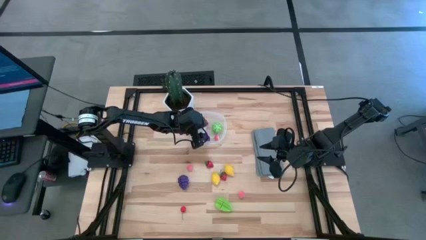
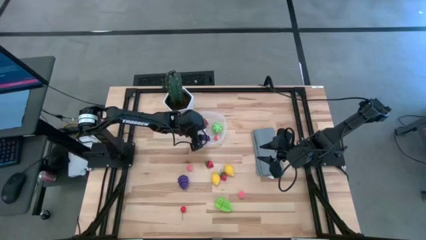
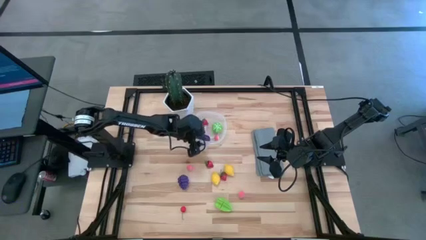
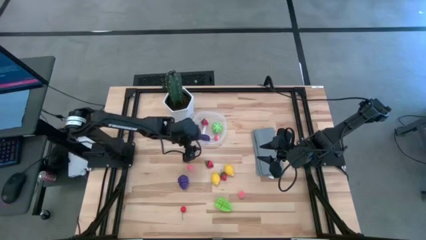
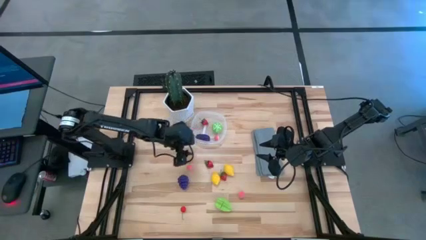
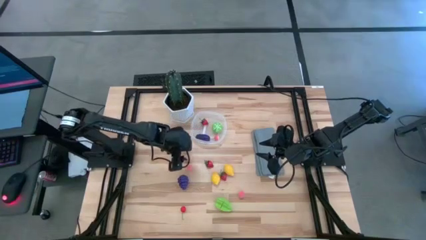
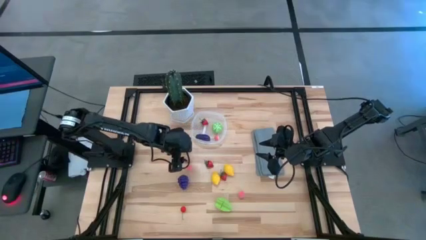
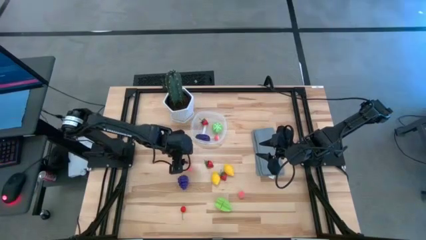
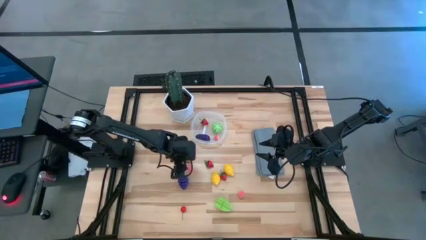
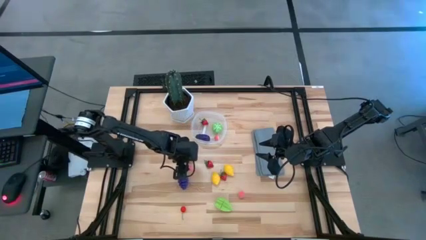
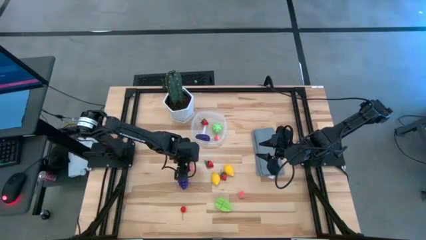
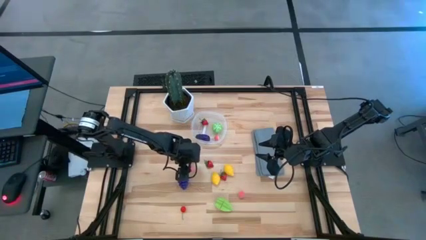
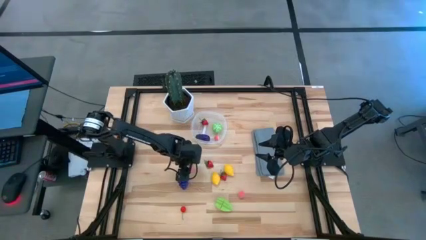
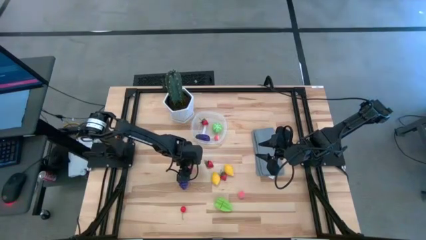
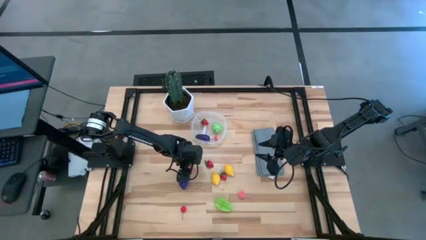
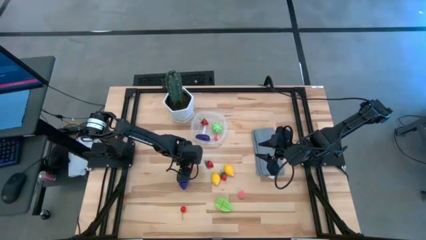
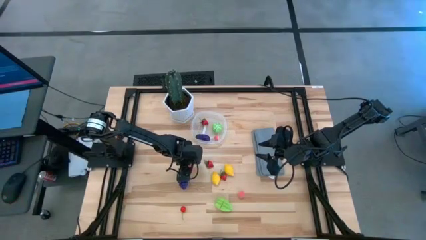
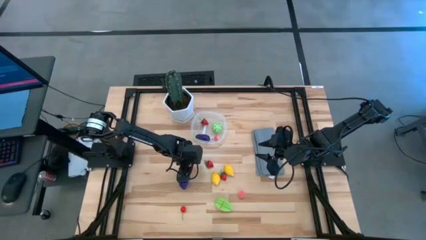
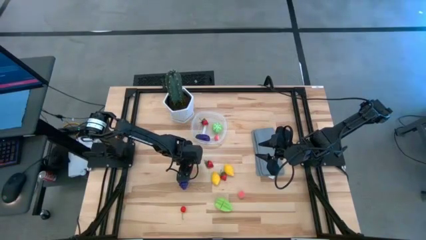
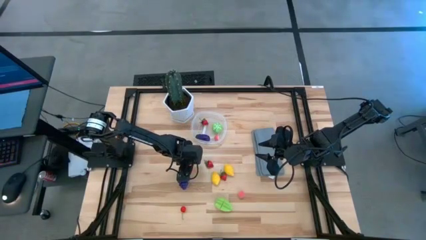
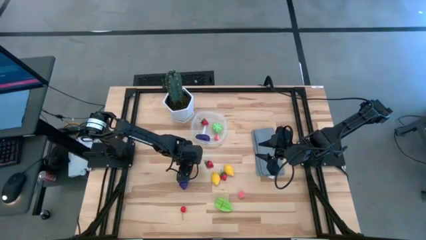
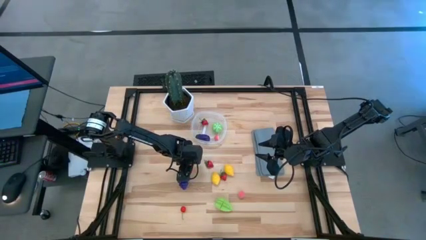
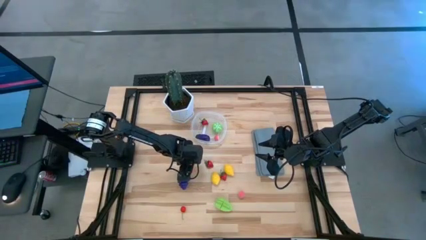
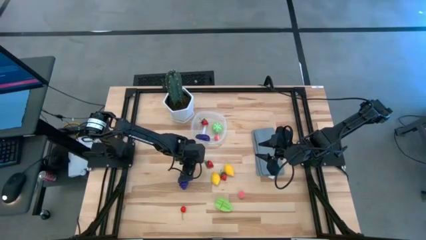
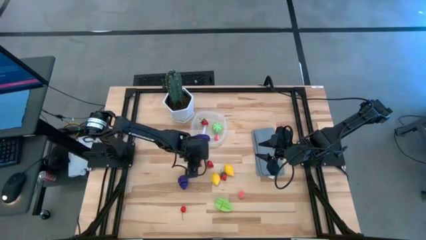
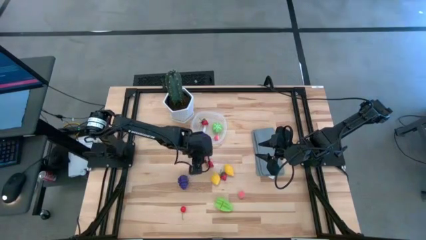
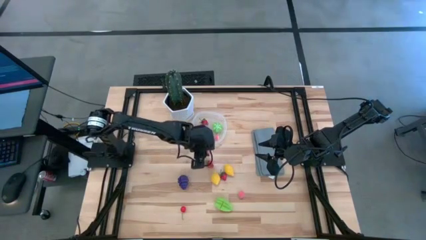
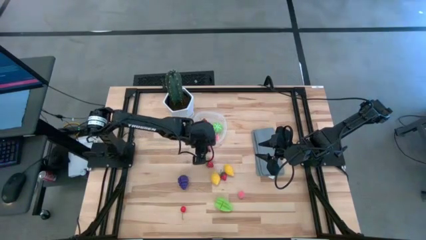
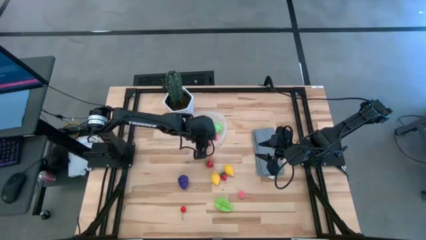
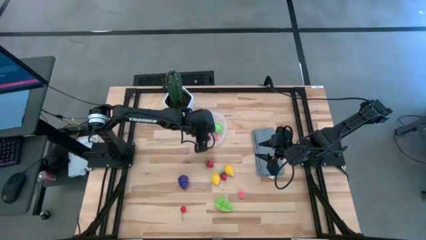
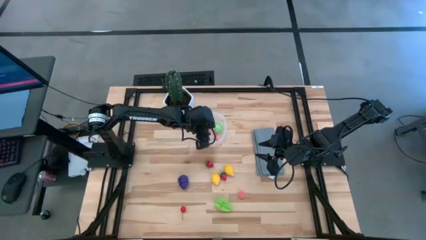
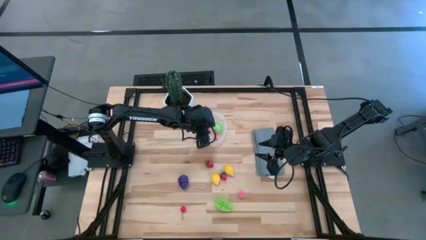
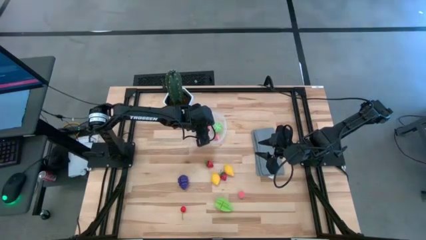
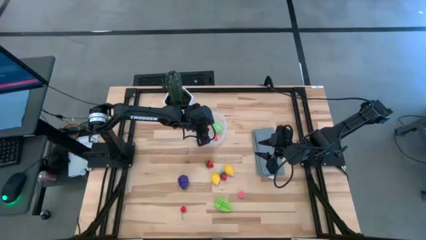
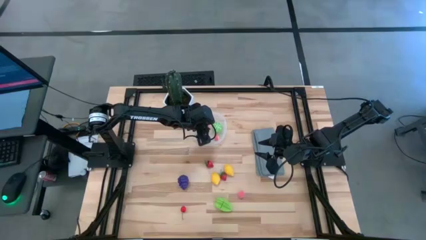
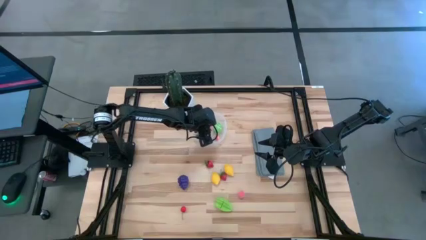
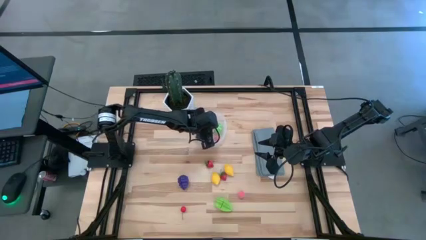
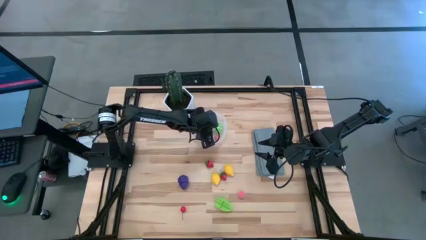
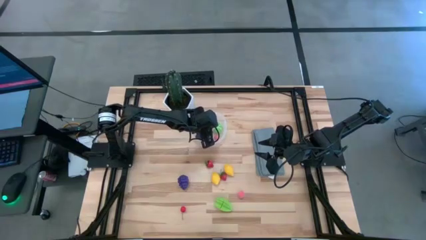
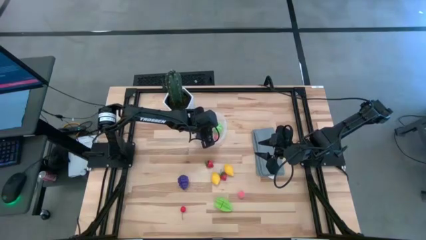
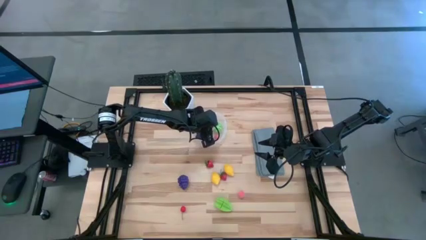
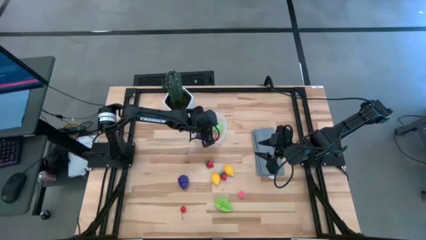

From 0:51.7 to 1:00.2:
Task: Pick and placing Produce into tupperware
Put the left peach into the transparent bin

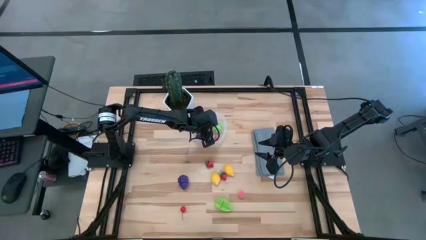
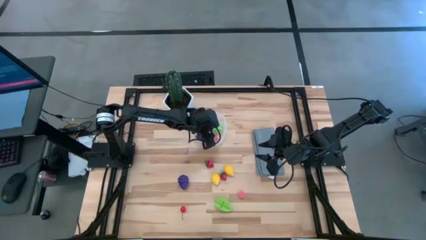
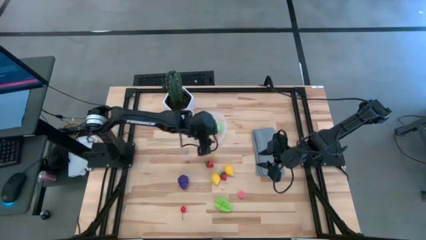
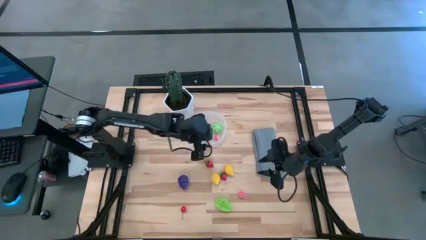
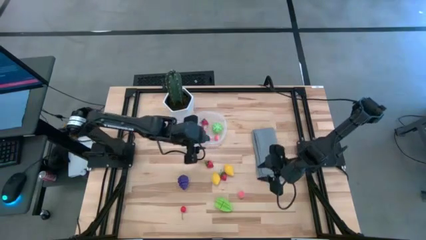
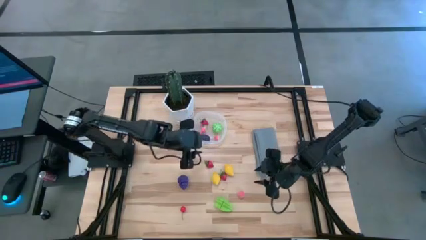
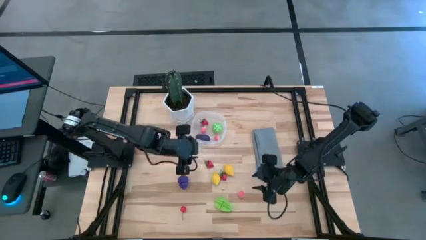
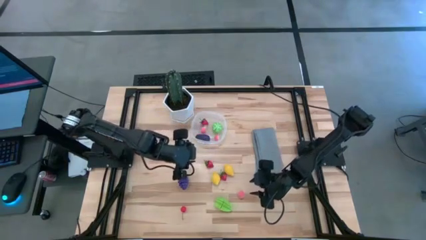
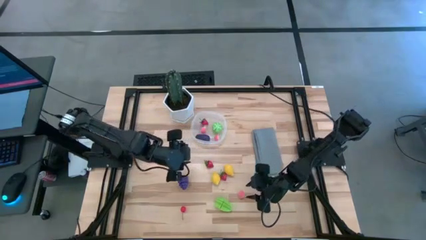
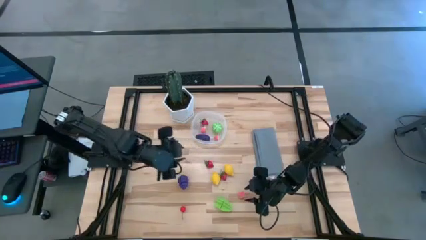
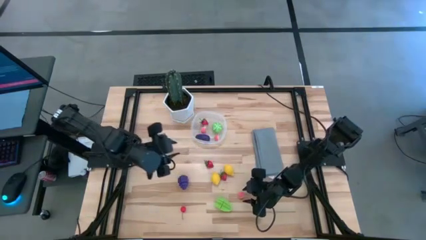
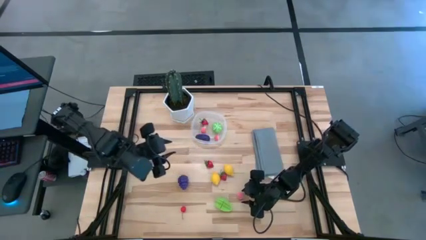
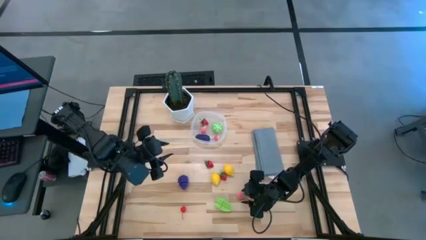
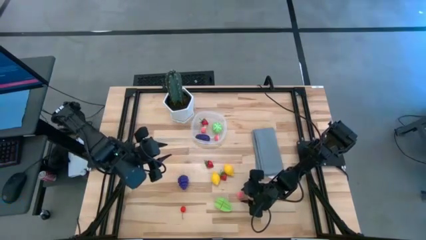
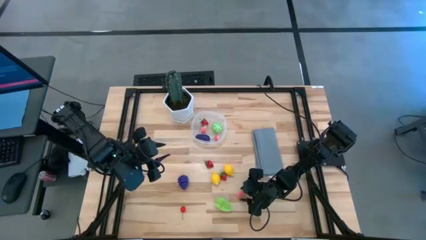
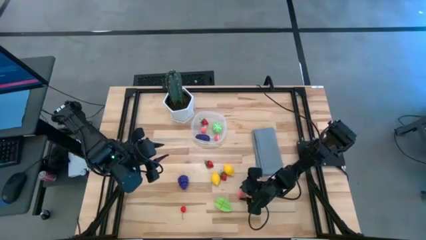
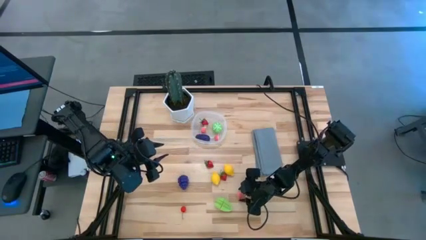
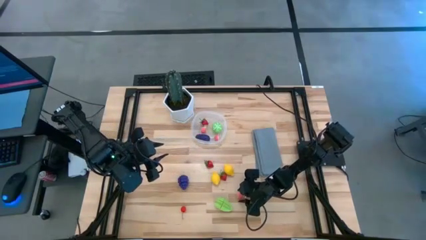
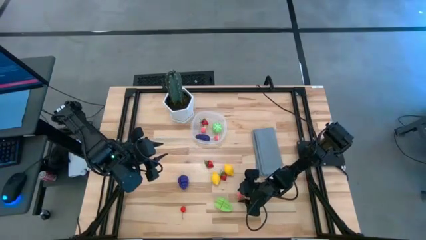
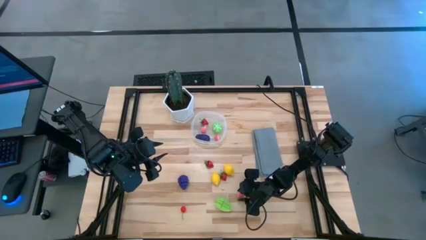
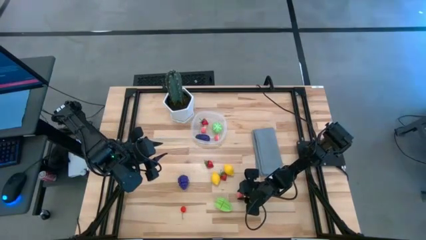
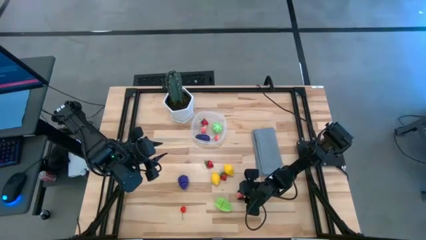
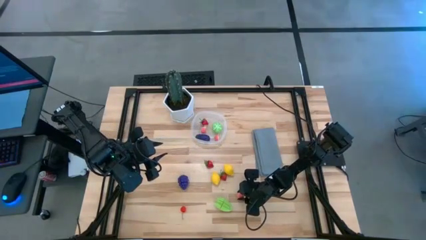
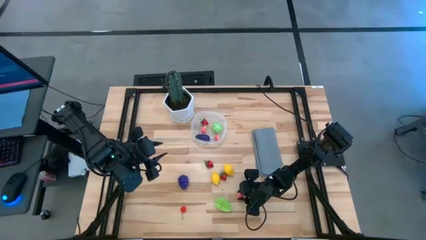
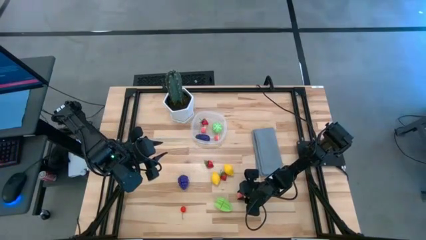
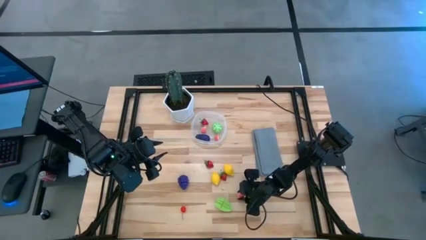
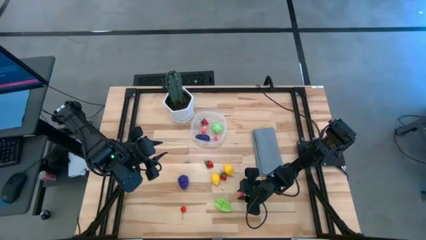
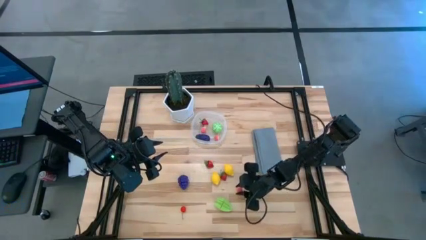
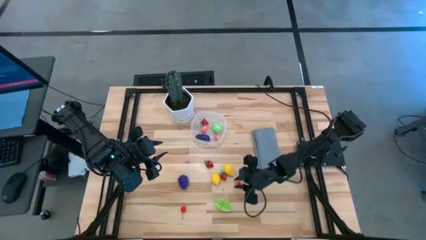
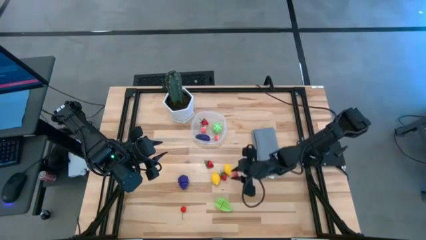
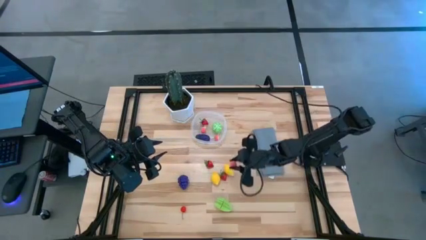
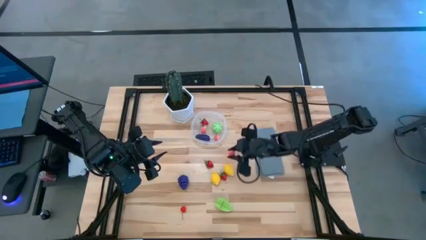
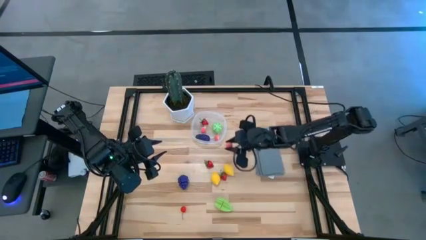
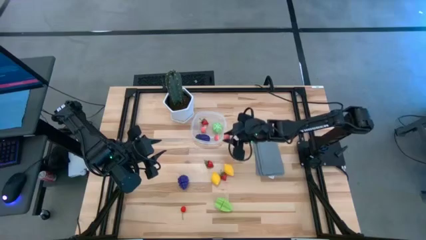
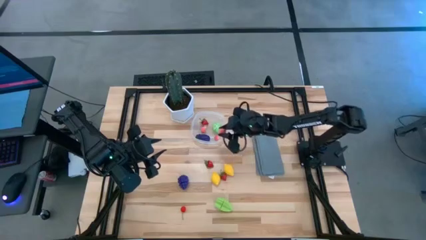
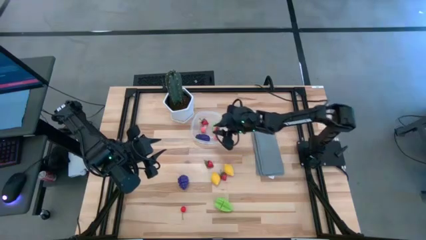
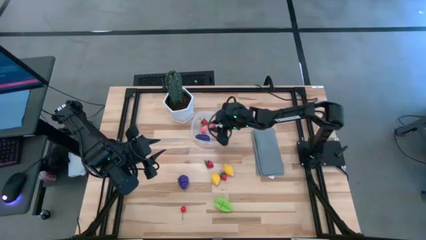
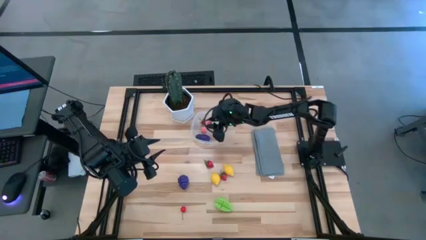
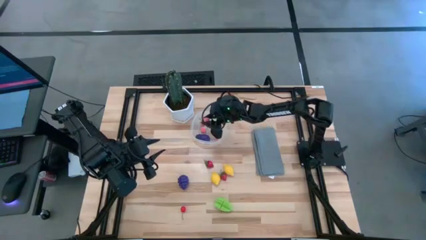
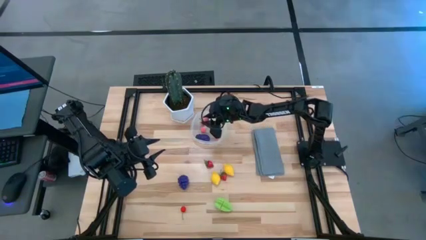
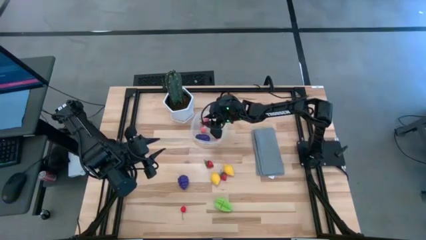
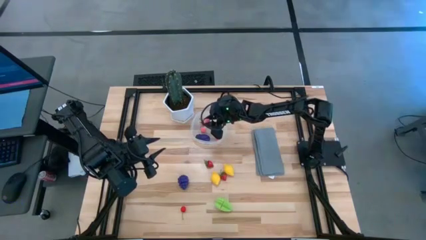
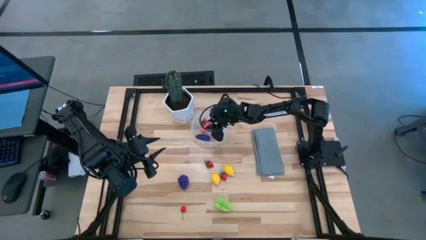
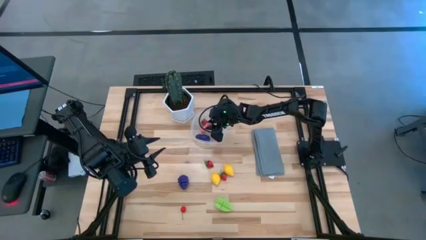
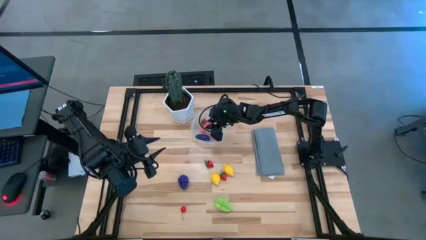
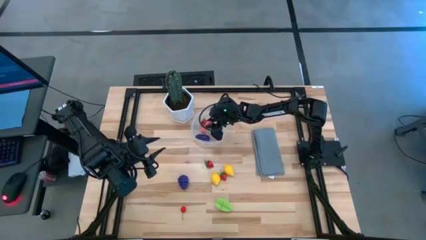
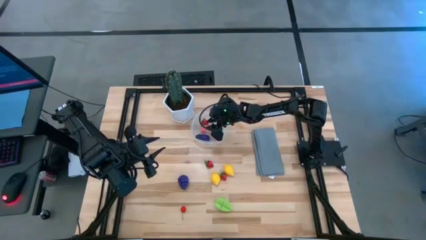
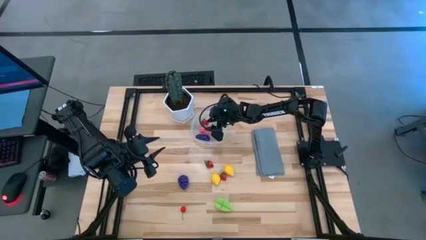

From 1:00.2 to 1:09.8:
Put the peach into the transparent bin
